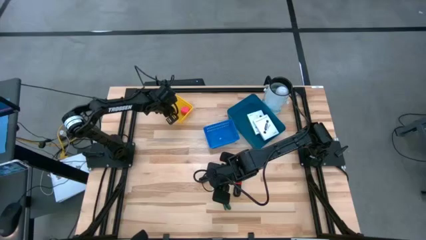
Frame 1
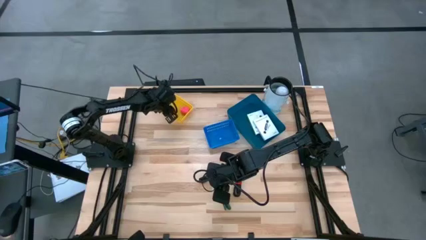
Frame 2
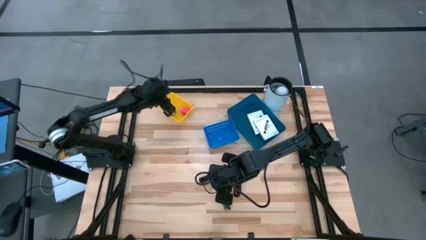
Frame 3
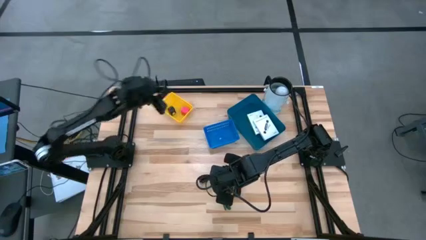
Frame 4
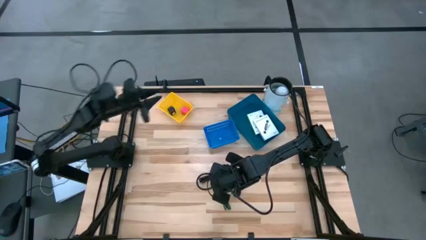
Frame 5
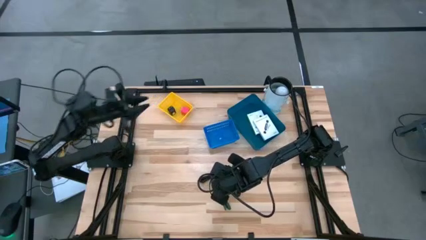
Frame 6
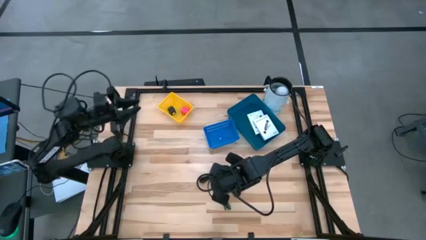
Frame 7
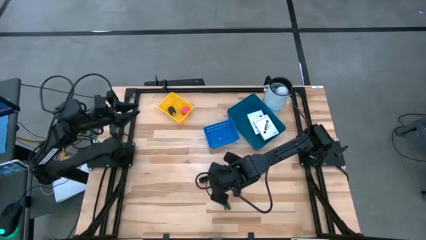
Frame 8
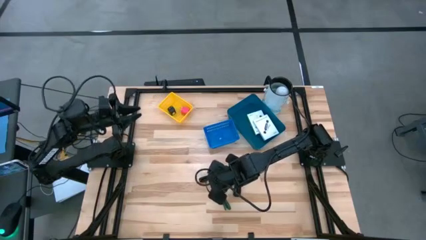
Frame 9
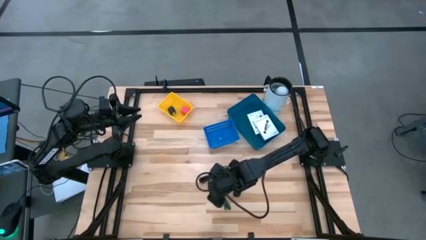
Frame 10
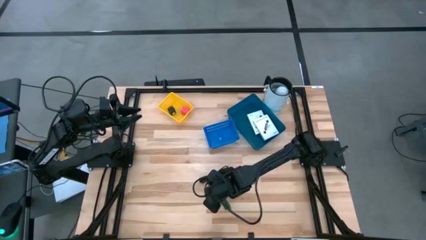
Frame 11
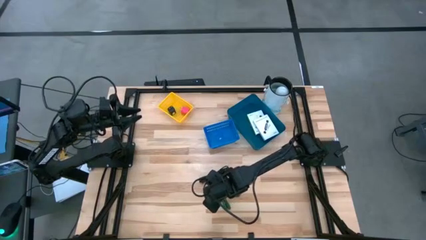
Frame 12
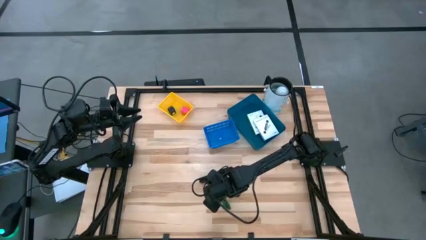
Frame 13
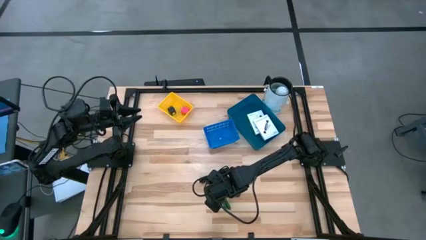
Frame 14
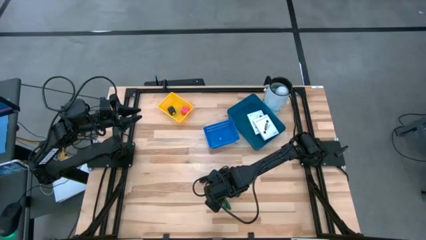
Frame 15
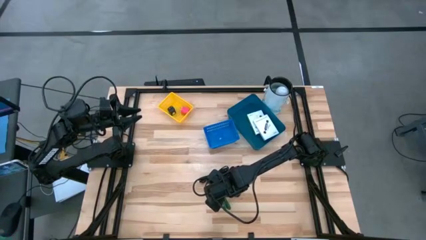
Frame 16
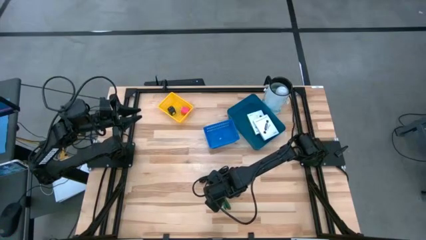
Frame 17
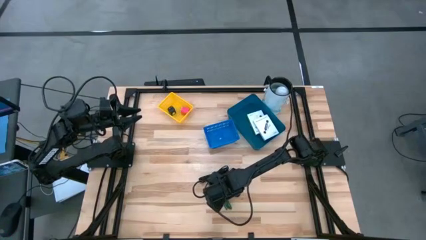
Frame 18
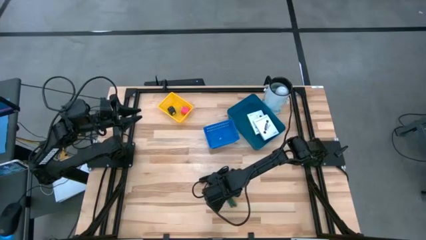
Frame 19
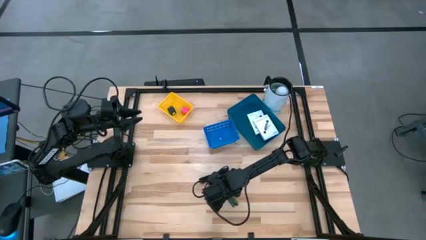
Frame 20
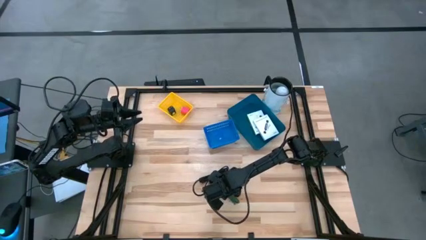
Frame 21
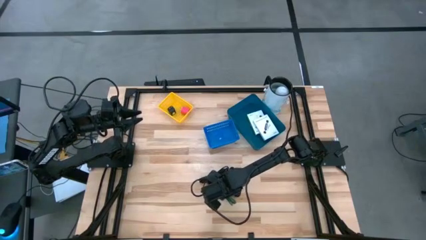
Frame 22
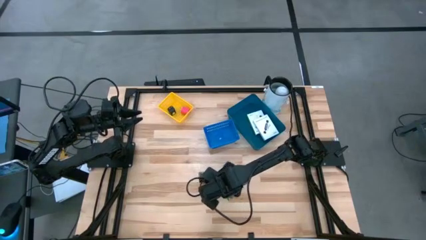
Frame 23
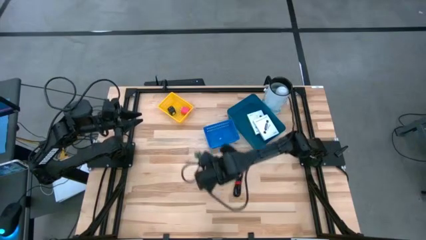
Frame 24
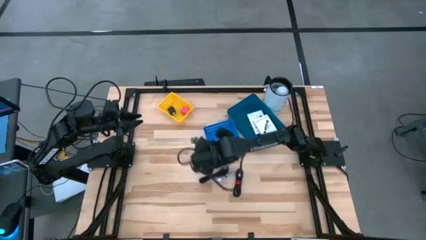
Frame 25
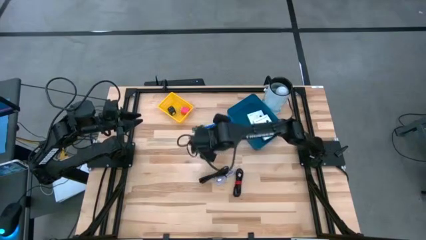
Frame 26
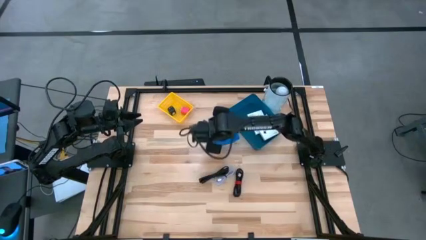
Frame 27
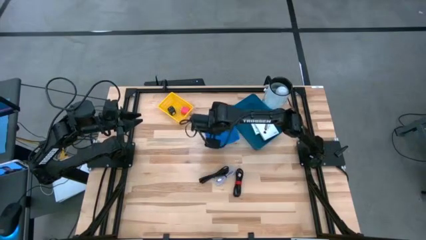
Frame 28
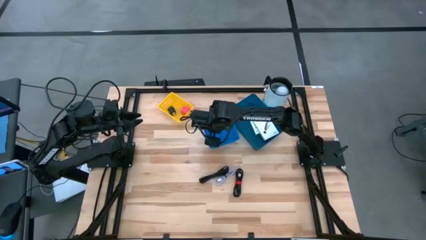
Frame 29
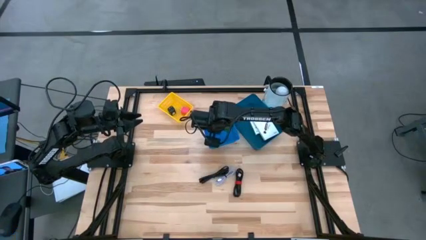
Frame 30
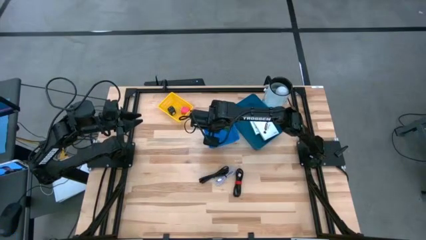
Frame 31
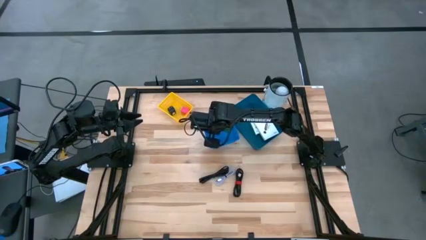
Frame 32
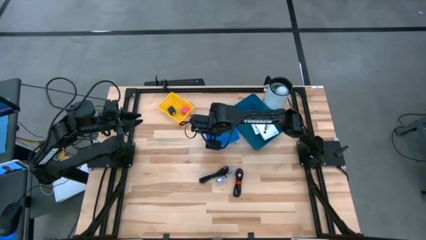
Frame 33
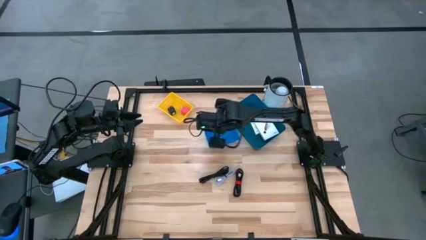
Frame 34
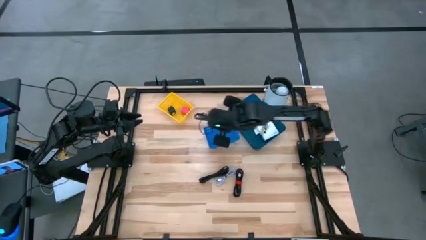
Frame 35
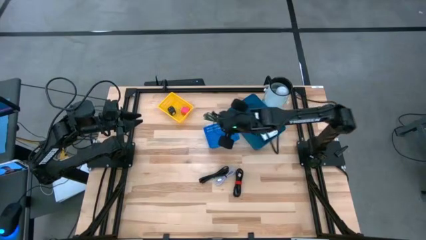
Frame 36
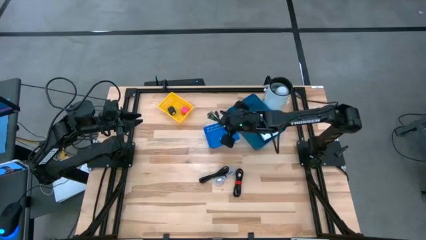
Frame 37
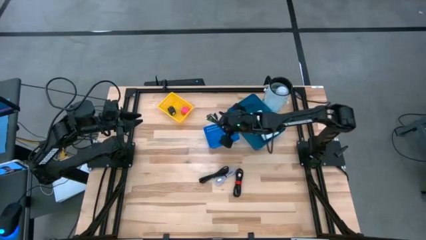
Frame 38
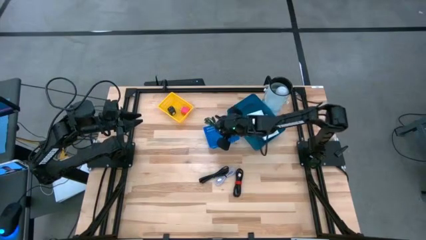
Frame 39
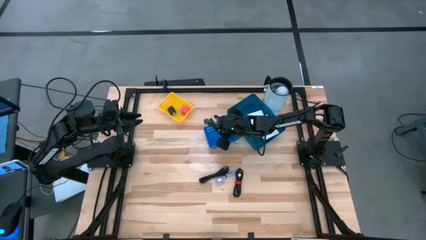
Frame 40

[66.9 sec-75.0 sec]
Task: Pick and place items into bin
Put the green USB cable into the blue bin

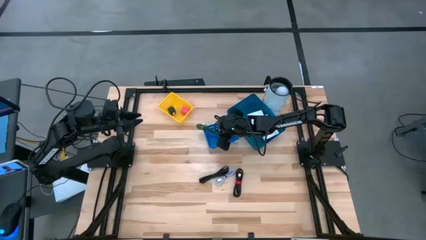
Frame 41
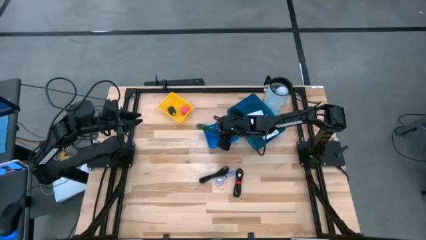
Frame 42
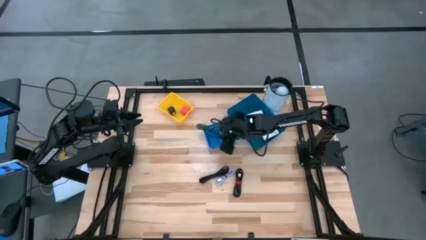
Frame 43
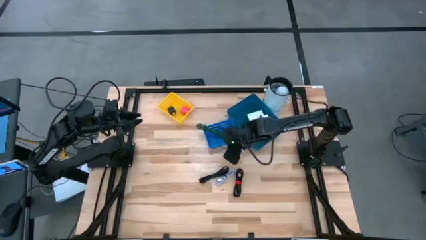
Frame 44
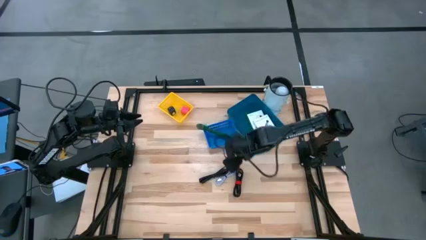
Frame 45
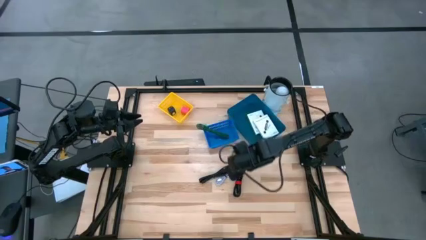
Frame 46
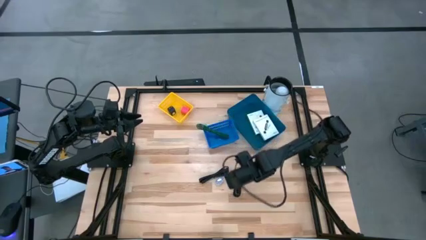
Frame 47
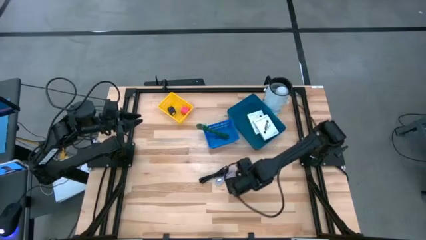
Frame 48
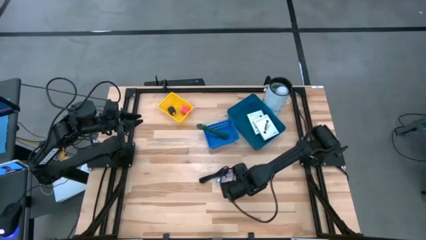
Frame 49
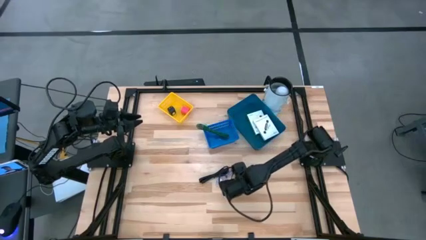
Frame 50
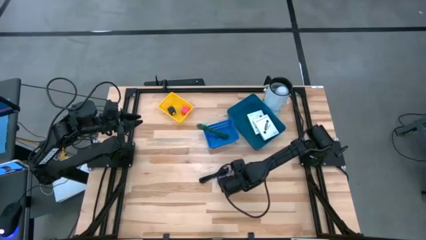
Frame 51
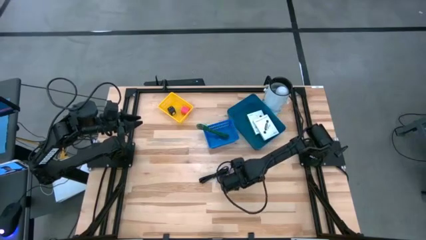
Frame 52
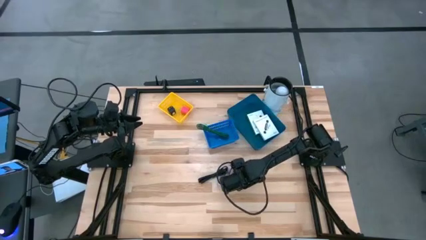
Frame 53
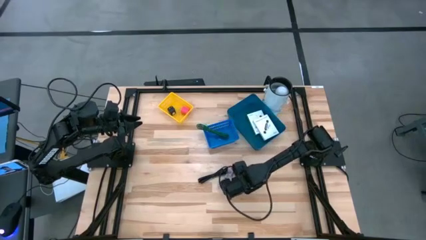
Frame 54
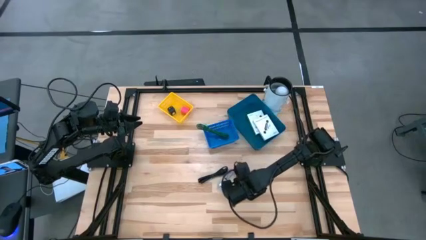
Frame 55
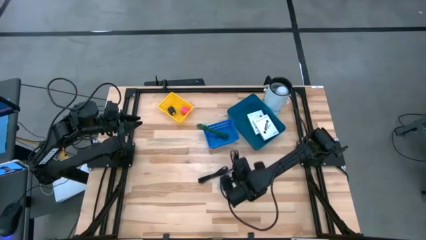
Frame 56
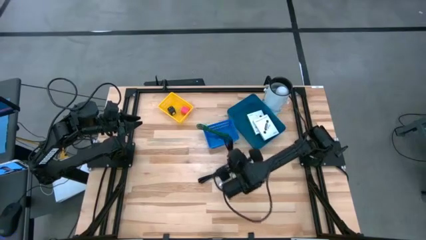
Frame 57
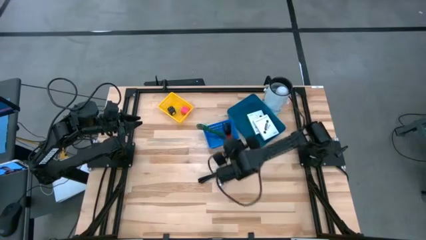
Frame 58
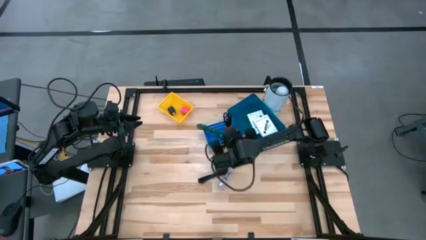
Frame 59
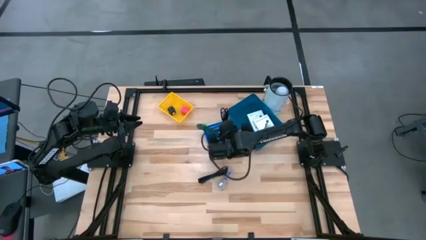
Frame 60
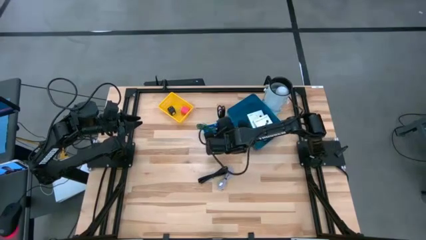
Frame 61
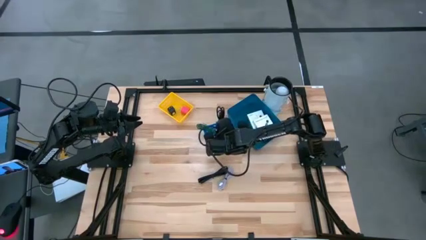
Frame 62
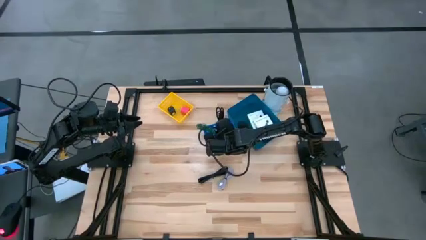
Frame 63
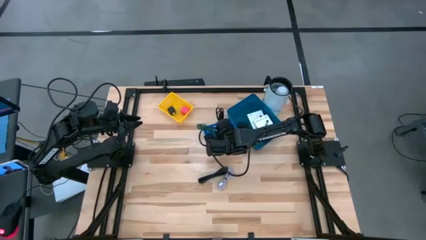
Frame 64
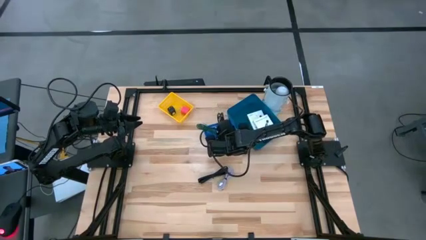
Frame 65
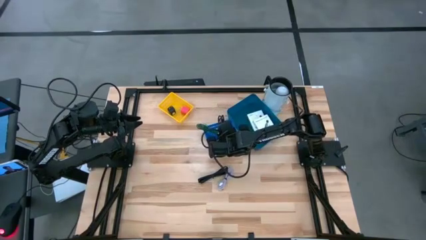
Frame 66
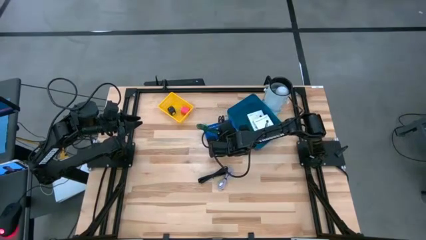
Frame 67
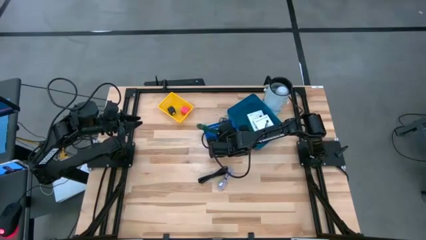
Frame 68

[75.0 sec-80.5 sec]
Put the black USB cable with the red tie into the blue bin
